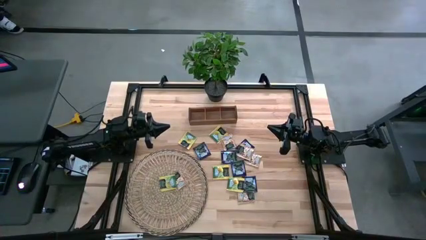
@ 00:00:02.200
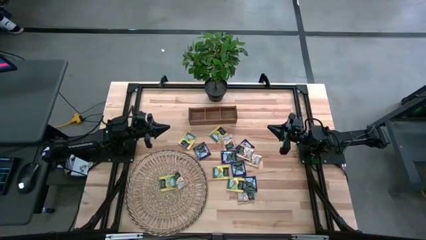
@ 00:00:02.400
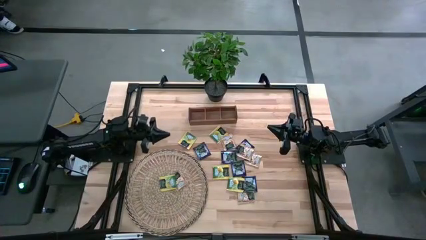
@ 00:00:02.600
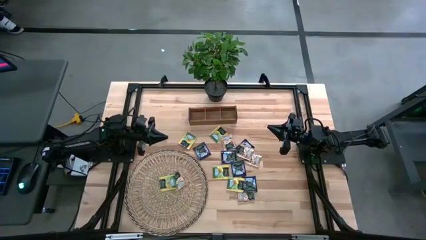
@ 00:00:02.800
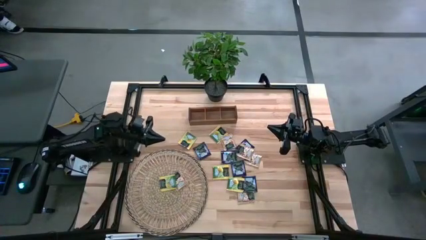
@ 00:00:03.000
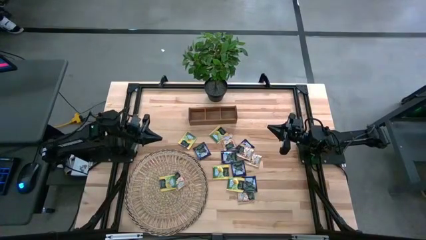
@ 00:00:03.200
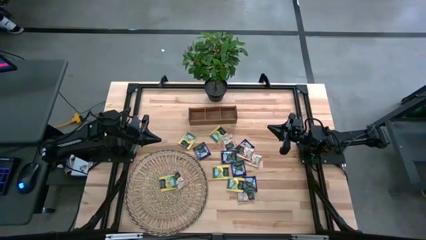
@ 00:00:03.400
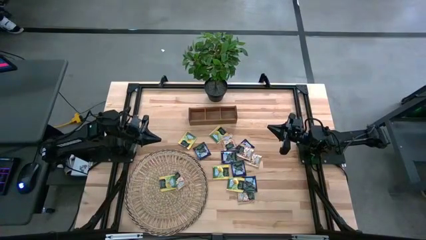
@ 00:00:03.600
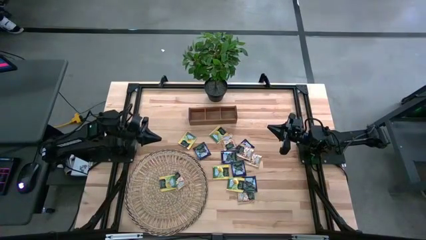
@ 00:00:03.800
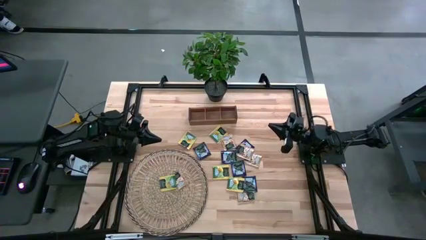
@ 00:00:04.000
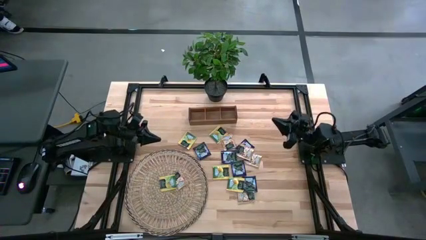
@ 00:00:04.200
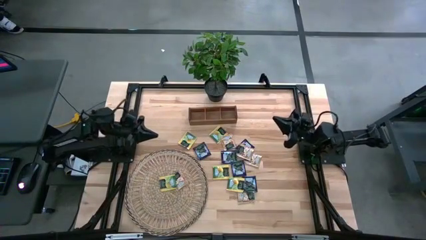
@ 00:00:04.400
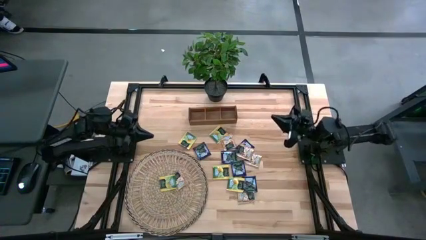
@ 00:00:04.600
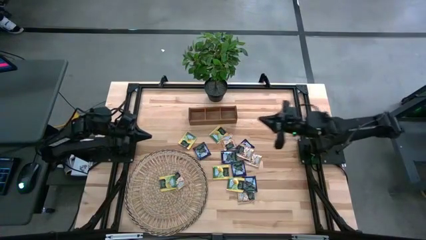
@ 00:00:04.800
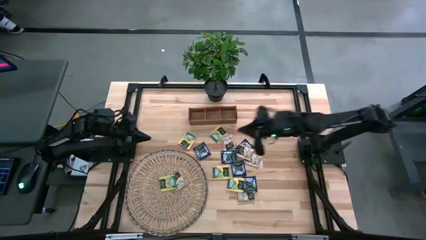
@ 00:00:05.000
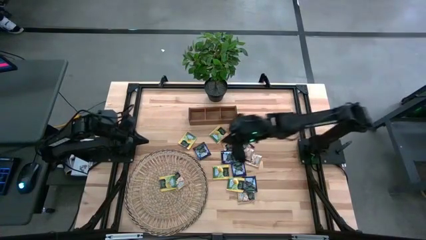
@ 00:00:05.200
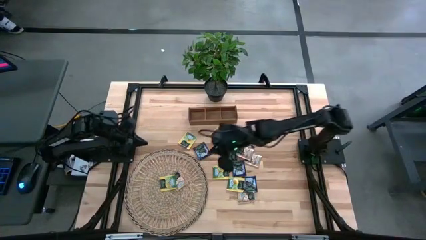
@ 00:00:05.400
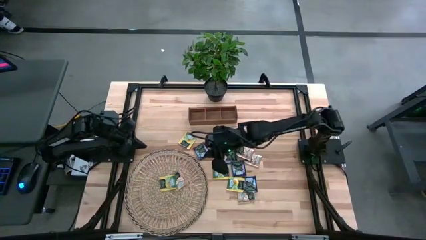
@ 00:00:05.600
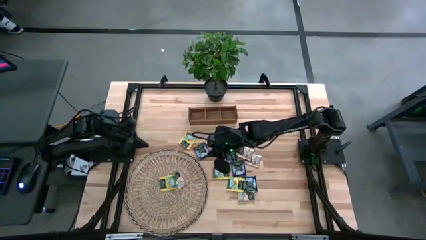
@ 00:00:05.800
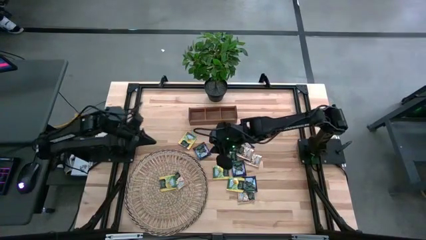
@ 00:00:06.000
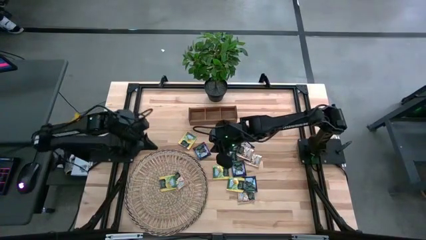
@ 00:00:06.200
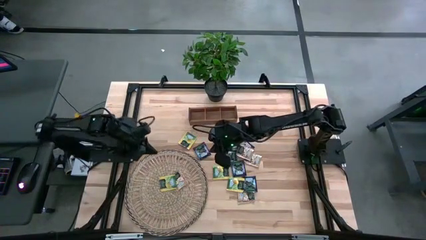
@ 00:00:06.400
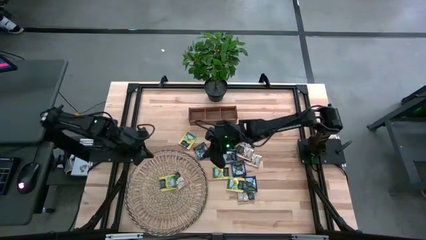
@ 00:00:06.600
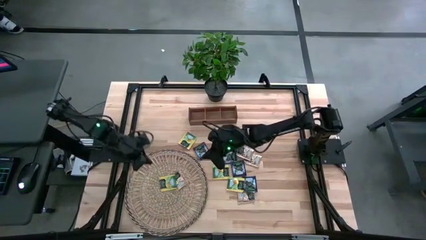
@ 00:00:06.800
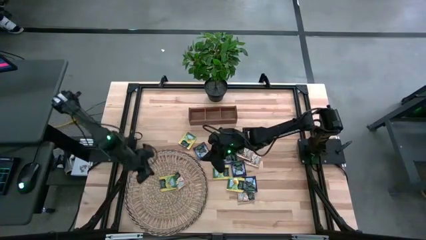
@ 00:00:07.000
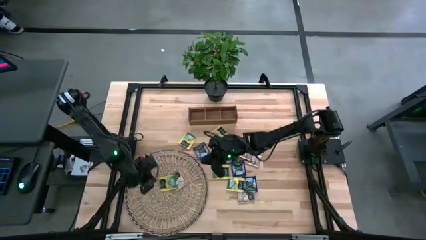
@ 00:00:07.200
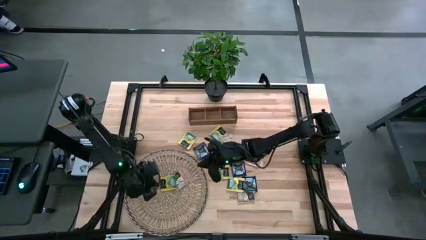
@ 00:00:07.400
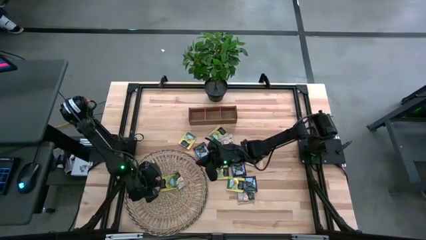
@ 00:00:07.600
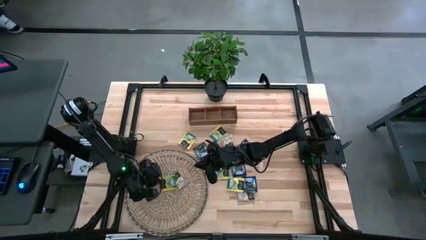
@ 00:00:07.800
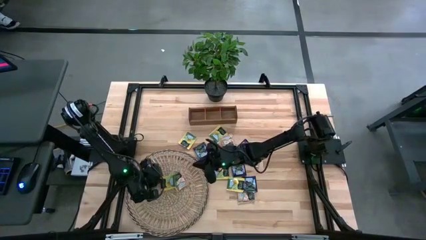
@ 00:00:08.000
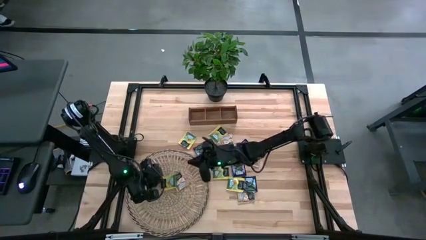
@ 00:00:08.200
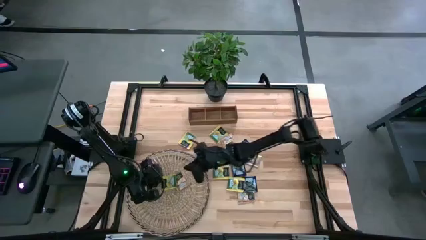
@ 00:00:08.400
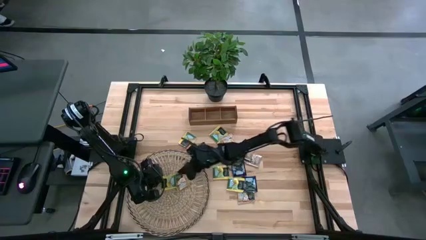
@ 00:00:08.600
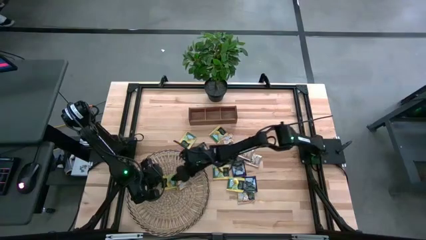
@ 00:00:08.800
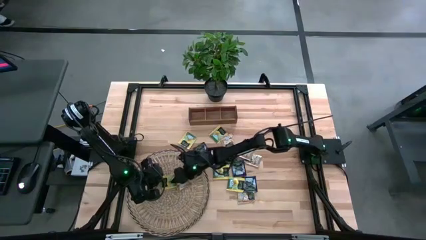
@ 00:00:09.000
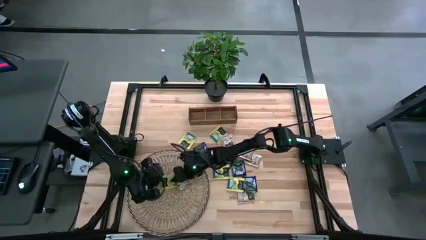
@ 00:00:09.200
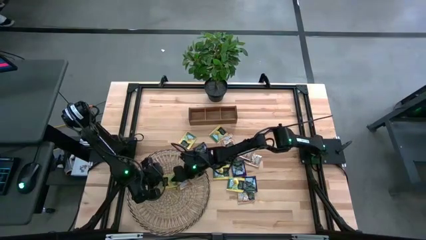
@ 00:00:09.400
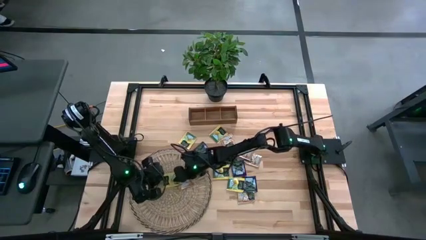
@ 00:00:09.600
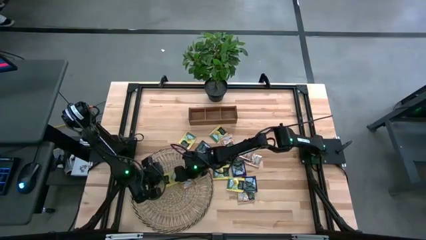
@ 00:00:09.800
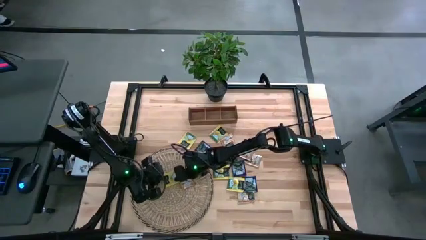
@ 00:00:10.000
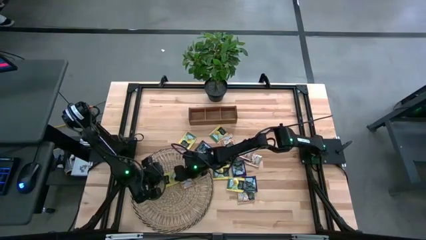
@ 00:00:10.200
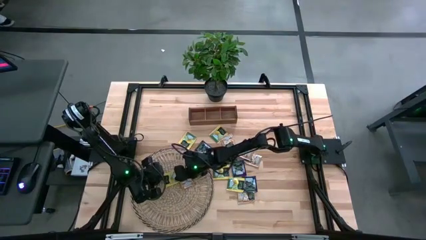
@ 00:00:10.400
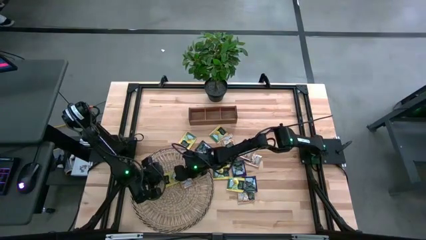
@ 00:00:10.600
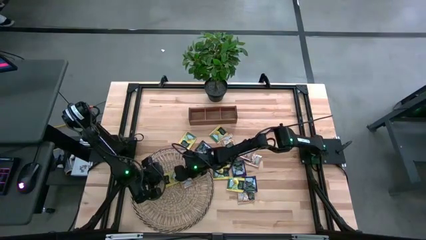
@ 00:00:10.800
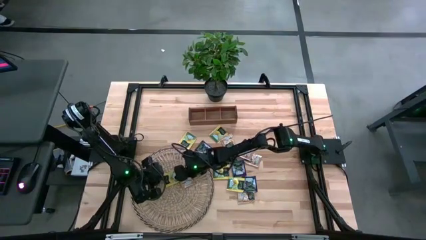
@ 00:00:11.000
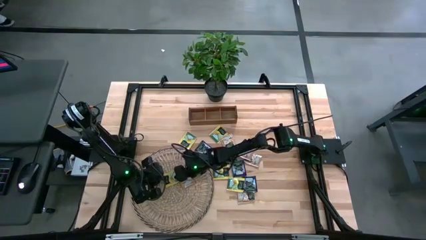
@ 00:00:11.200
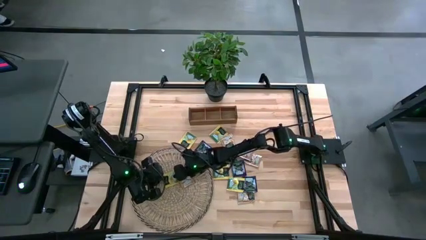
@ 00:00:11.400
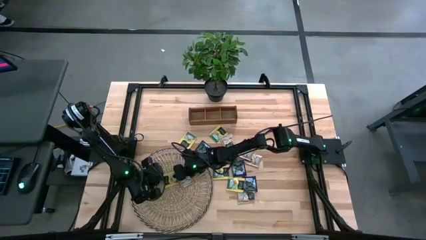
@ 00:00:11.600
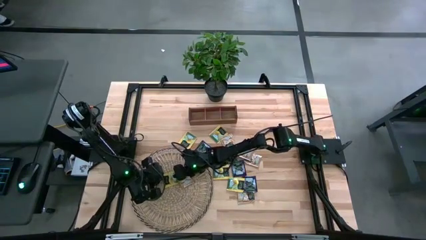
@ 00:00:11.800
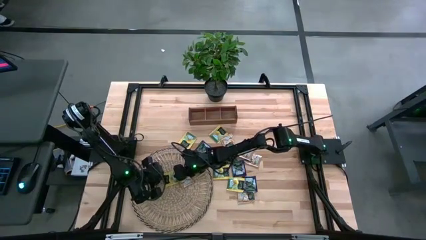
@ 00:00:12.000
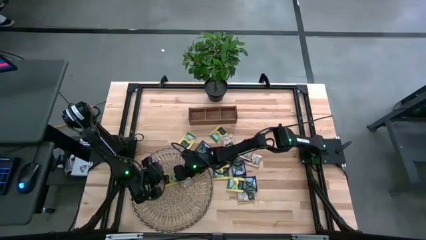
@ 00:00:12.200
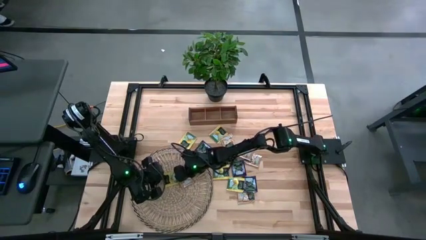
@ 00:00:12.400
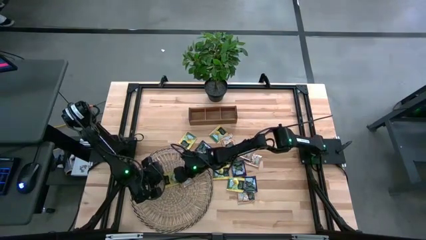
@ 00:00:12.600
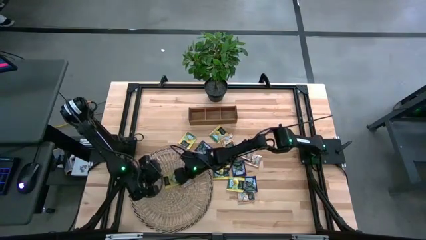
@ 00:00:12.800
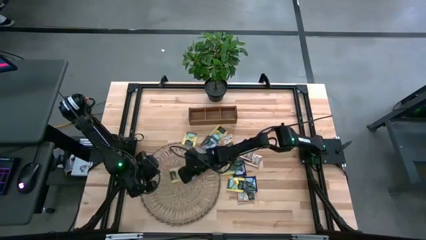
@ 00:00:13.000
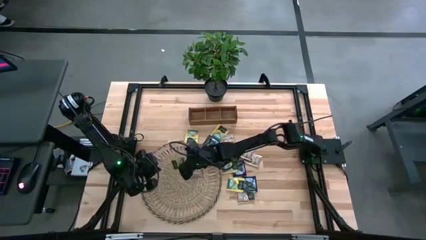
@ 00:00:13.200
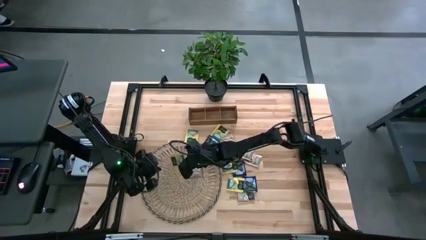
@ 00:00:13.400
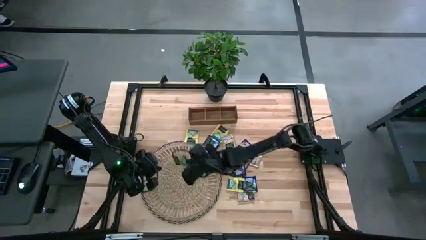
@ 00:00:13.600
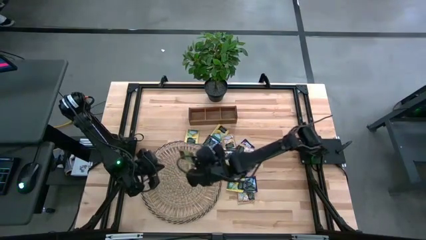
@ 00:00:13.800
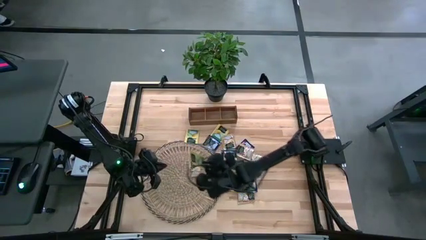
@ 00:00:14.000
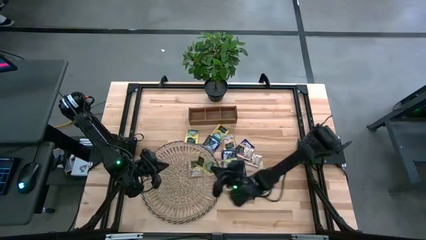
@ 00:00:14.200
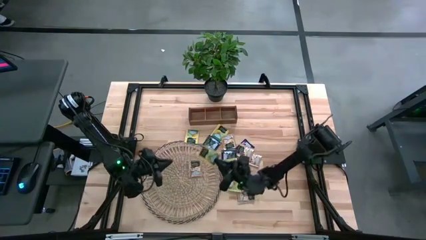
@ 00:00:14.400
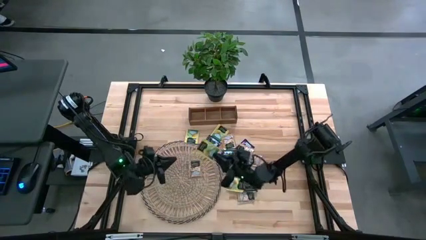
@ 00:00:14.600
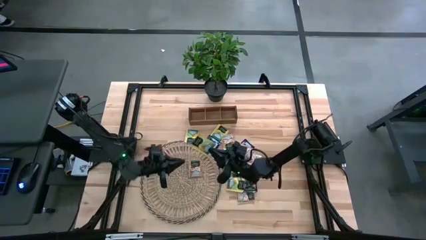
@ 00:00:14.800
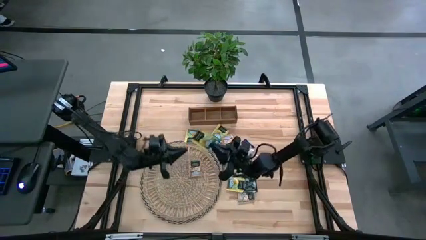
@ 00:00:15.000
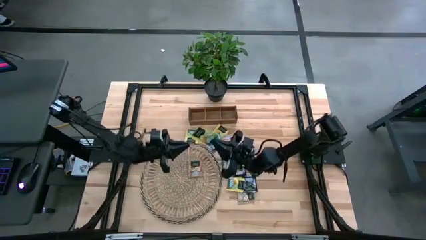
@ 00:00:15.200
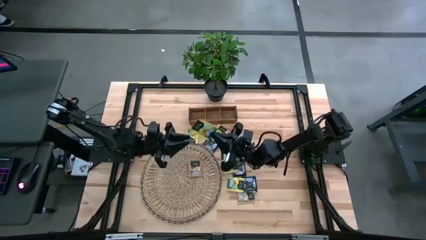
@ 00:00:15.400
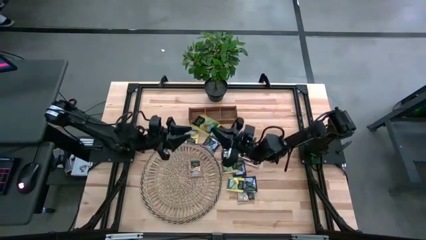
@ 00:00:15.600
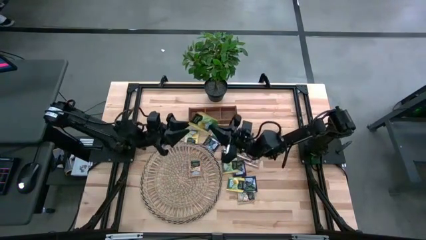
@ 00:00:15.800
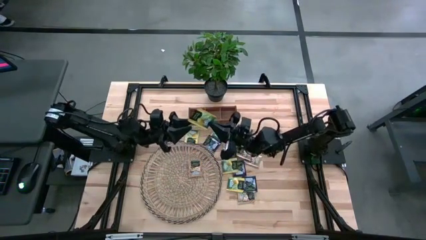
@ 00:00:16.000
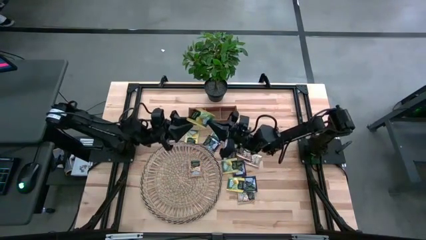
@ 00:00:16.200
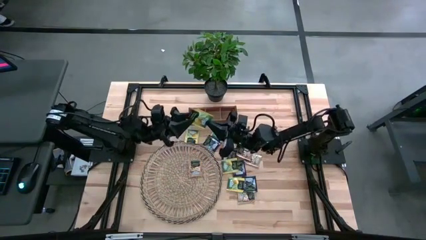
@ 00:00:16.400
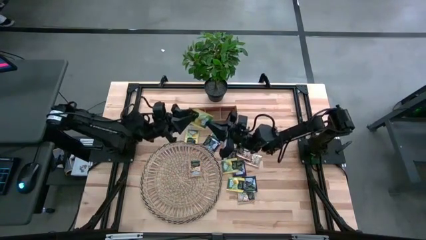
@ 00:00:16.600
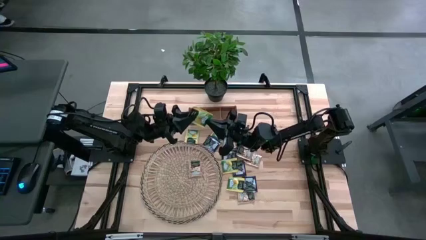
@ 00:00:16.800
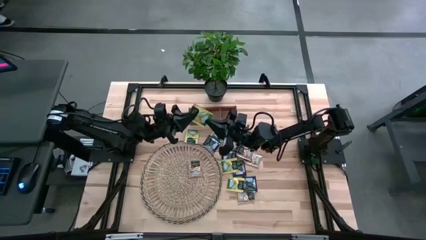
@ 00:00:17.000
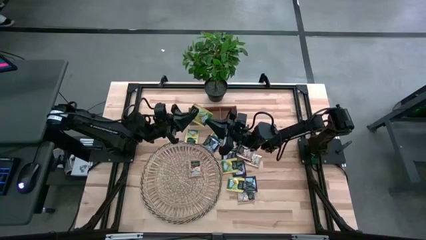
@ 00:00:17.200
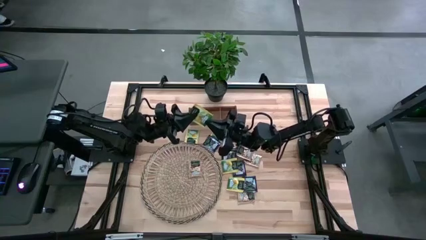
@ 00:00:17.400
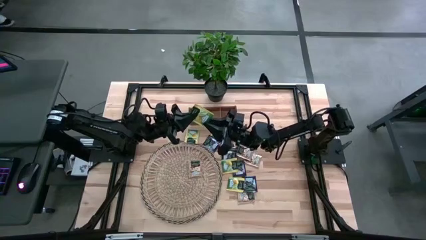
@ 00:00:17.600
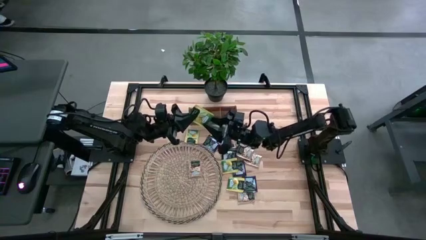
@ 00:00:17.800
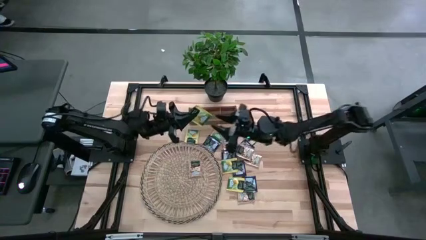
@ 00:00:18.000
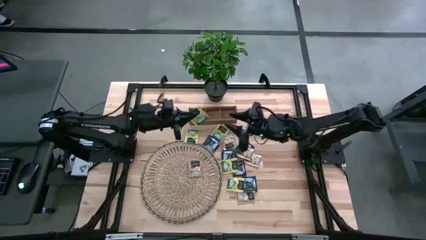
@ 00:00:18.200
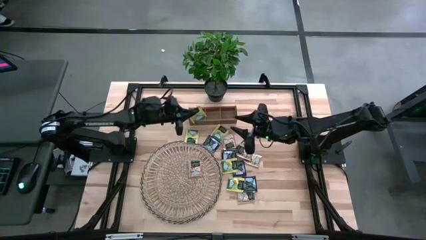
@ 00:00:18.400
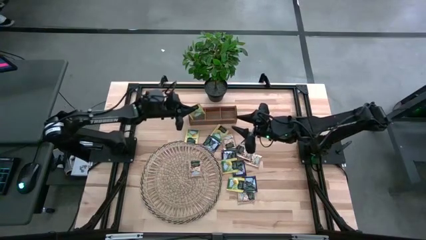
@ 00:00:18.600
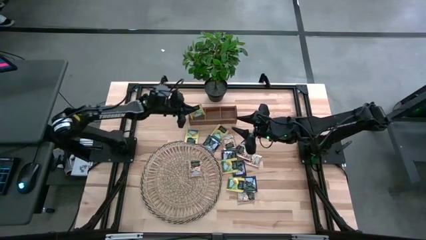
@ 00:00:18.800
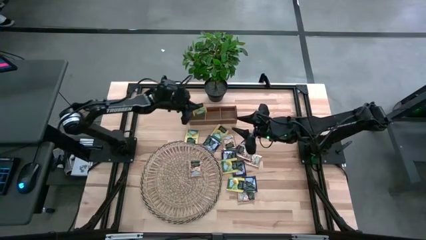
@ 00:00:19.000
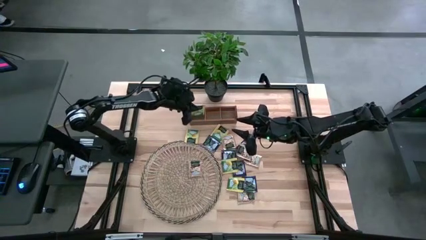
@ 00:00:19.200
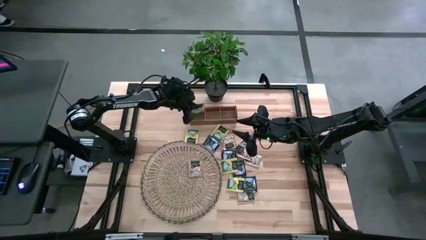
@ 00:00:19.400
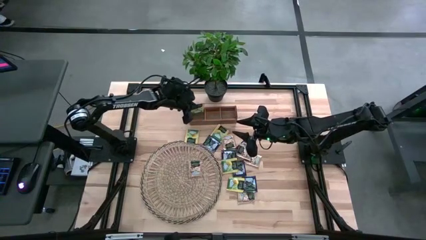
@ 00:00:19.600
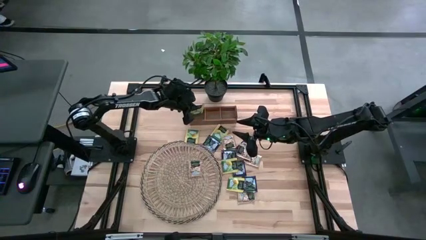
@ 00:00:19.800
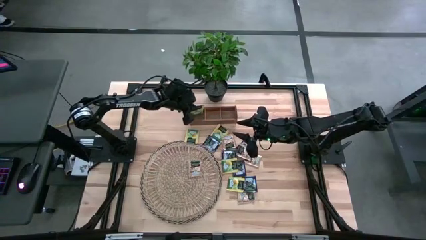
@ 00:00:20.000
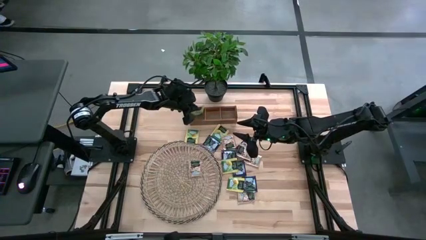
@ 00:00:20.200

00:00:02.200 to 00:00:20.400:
Task: Pick & Place Tea
Put the yellow tea bag into the left section of the wooden organizer
